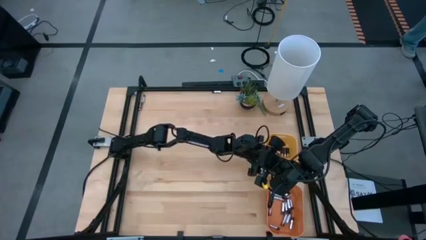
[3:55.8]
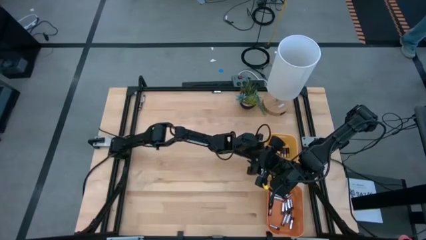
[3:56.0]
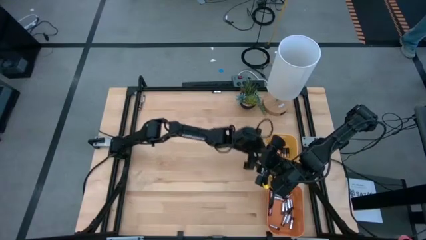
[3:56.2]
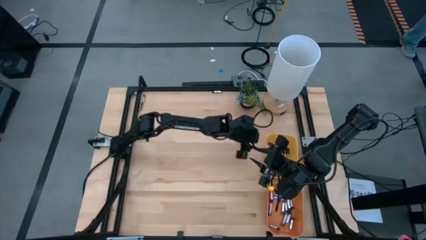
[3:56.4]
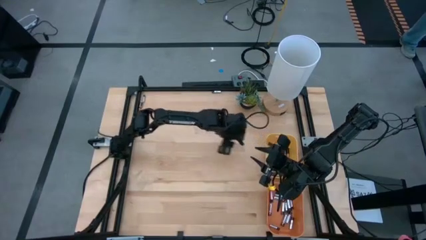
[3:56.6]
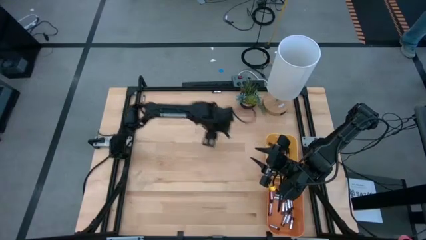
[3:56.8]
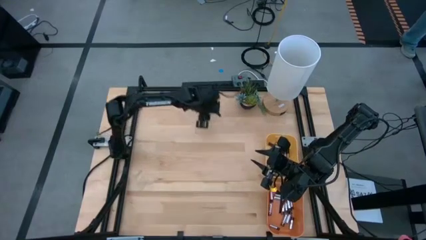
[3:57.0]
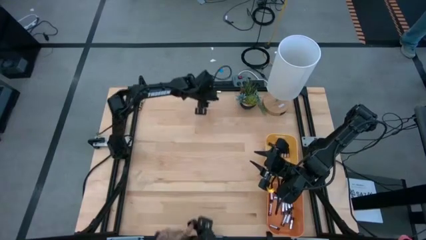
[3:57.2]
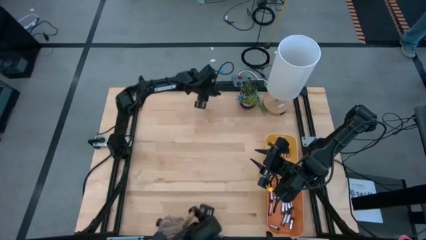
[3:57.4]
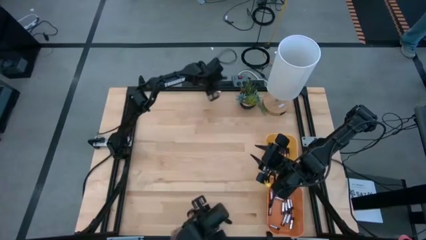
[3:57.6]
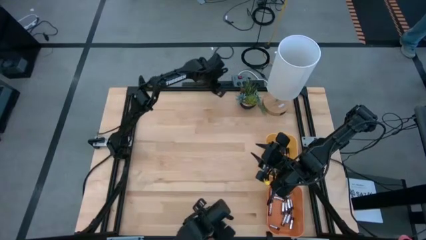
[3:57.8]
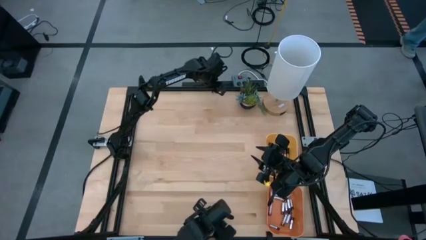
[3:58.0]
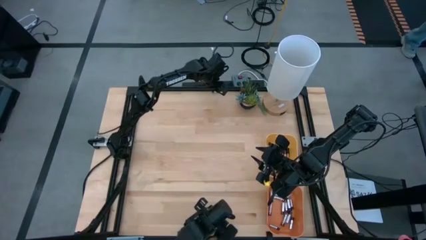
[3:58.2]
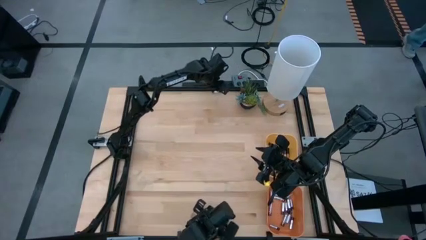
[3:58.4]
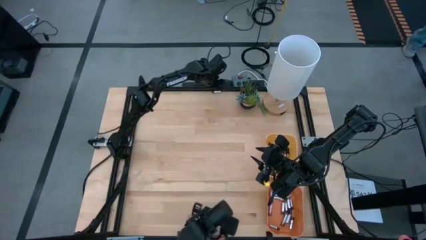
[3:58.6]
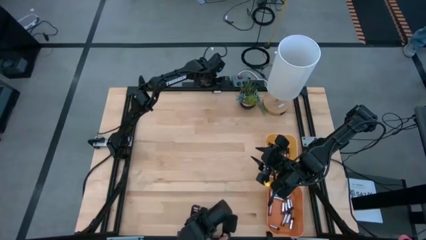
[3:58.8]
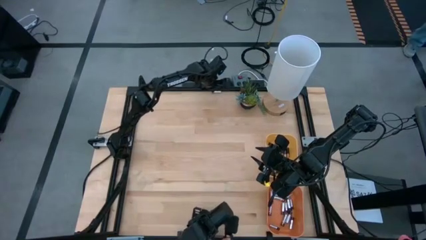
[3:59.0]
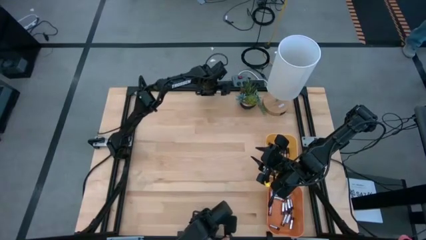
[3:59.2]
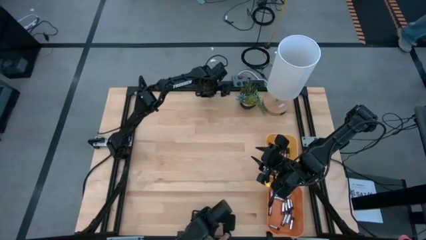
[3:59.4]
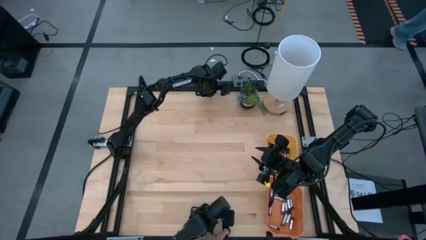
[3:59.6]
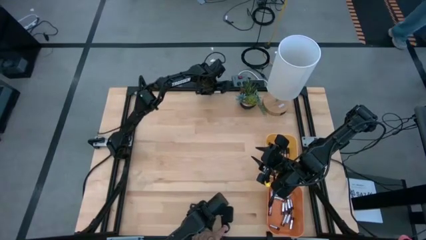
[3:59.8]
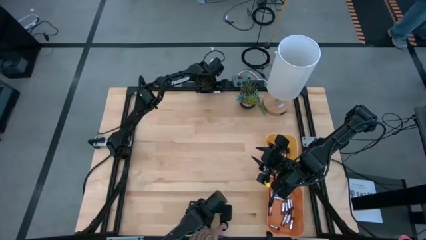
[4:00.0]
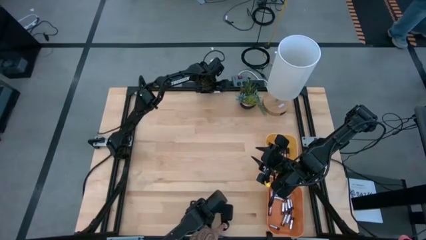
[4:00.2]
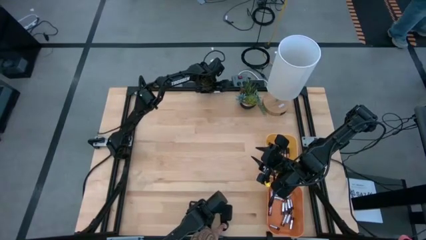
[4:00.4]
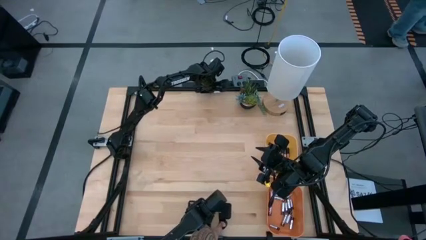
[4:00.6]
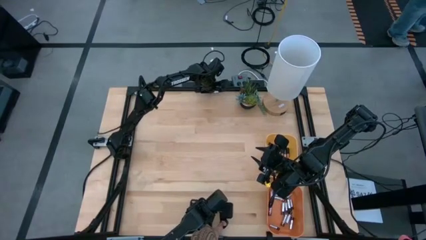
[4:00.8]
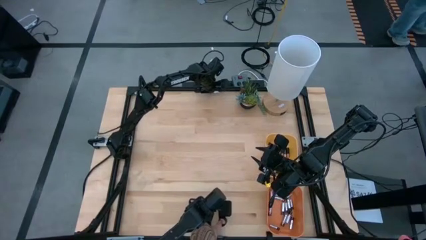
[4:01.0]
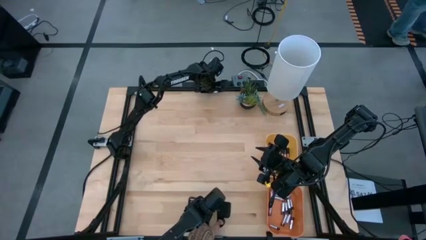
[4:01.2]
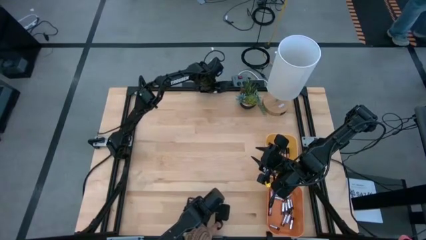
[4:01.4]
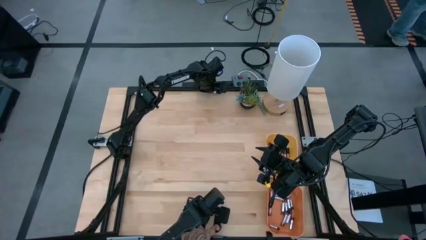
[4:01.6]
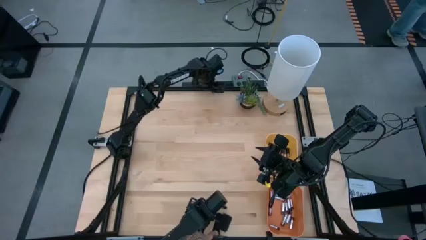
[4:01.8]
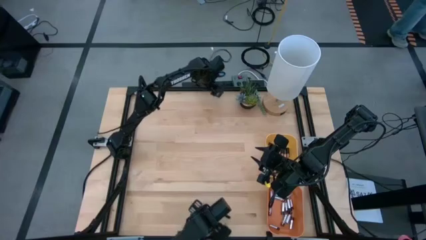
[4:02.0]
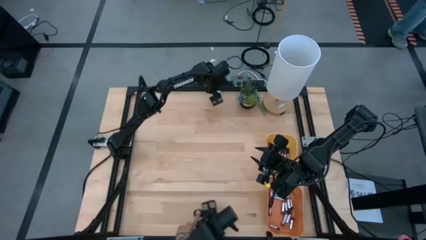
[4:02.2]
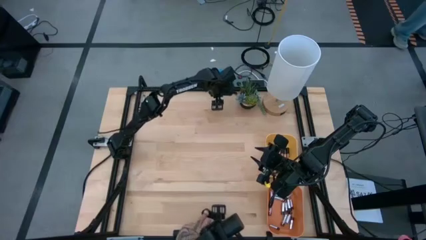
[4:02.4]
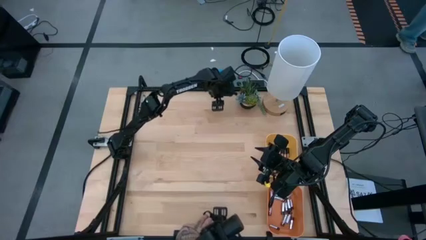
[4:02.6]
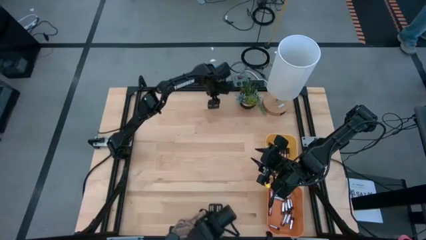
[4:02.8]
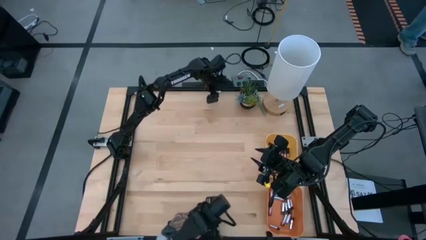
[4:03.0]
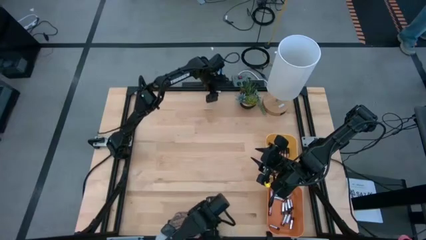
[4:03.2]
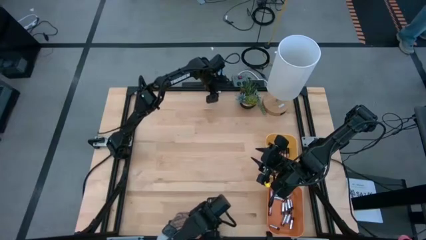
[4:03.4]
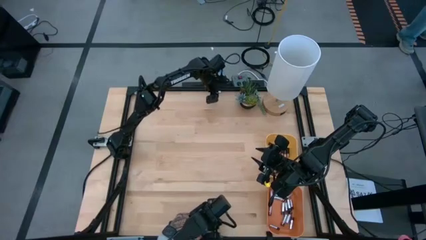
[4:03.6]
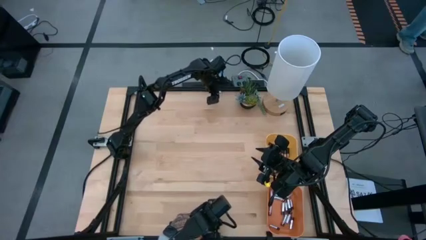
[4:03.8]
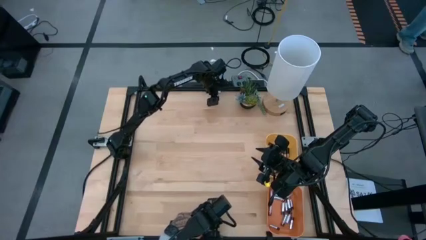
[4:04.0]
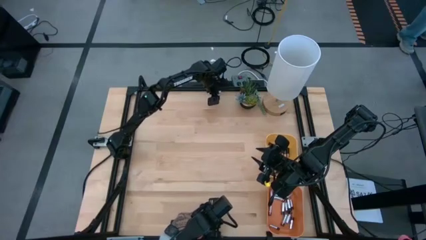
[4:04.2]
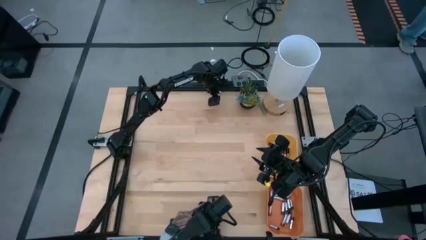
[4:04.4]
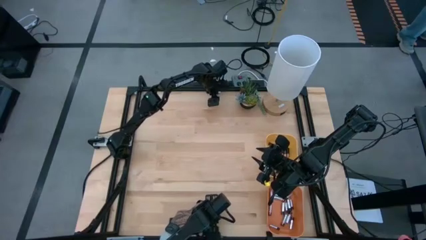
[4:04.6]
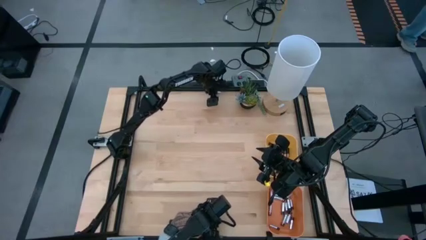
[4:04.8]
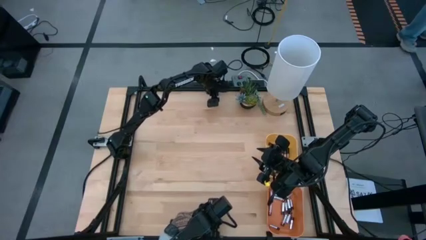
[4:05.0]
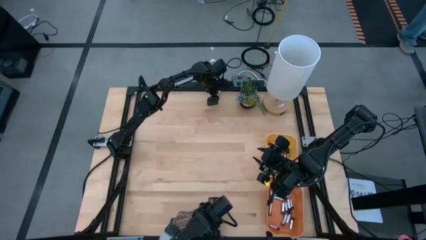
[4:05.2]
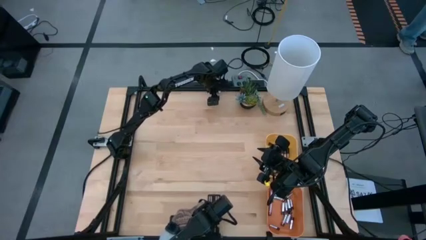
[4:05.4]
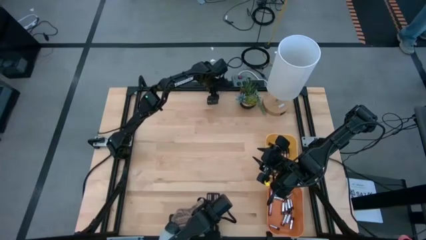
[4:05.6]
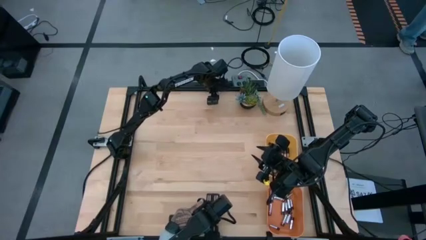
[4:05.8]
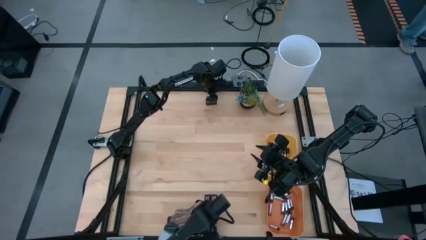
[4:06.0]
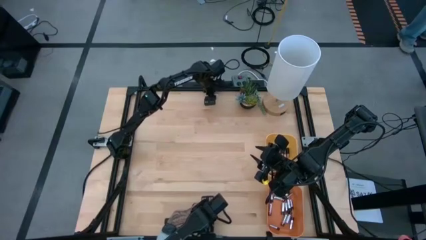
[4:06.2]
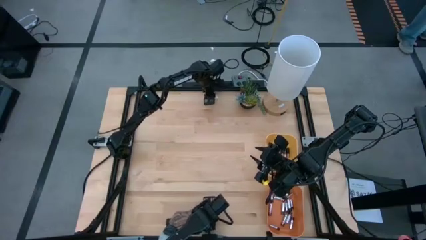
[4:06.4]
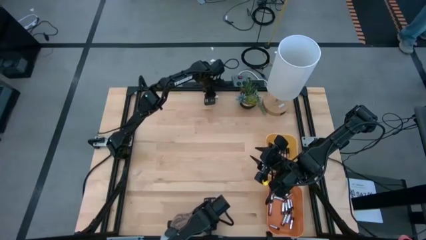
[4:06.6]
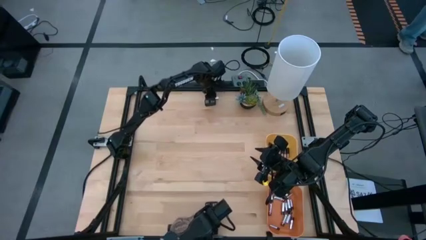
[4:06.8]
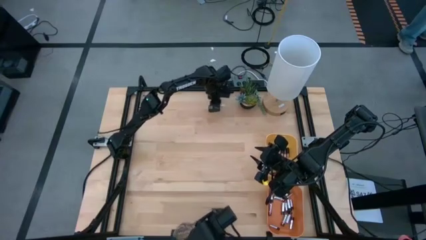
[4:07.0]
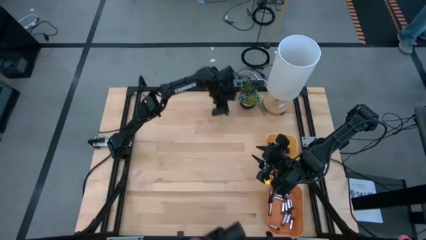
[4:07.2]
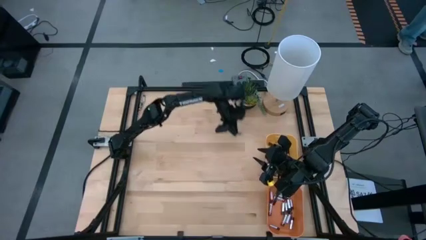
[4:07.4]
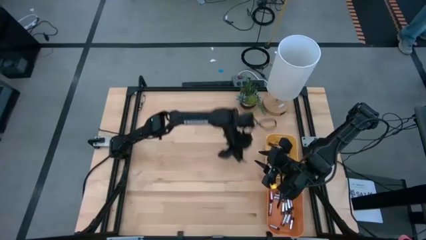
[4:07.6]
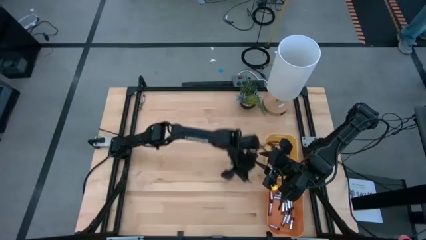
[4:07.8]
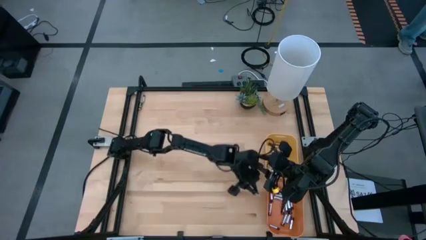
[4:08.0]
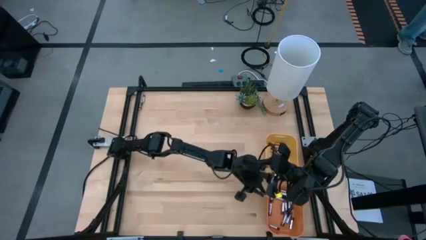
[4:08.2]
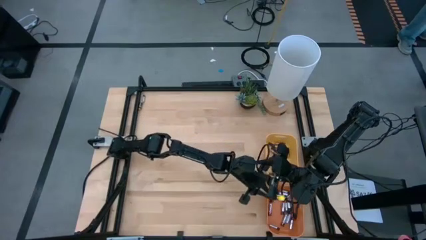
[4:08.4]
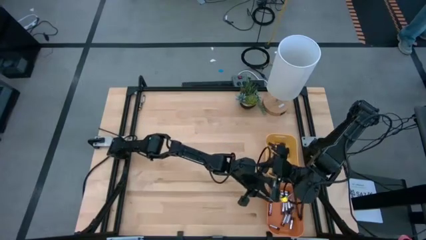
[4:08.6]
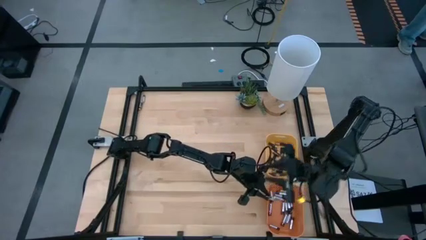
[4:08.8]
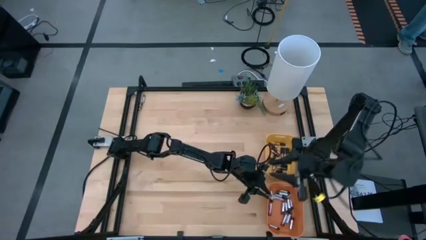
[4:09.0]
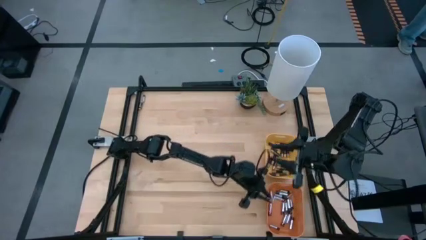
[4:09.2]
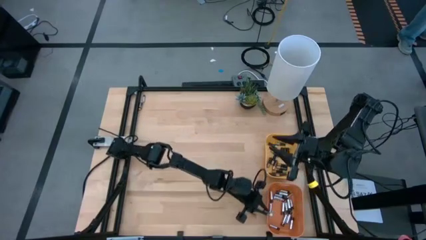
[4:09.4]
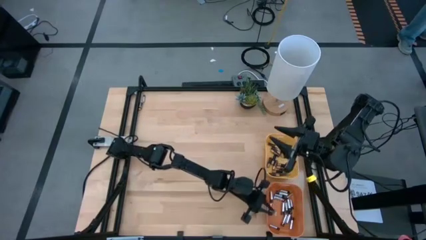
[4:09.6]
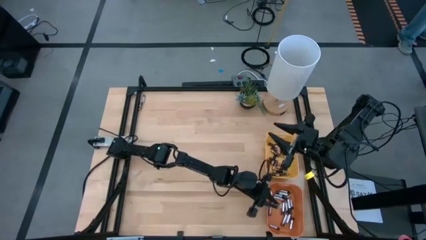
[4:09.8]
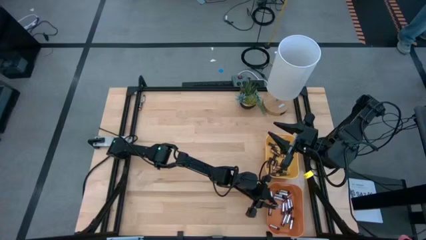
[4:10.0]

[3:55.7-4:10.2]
Task: Sort batteries
Put the silver battery into the orange bin
